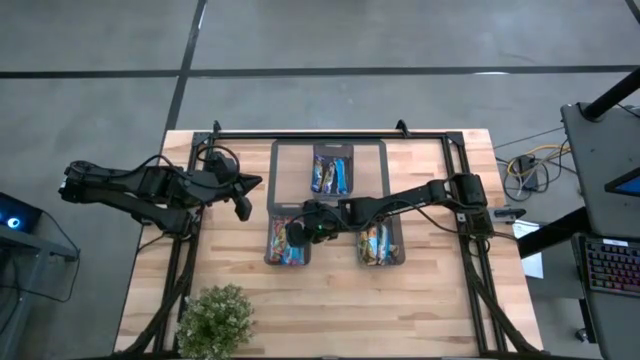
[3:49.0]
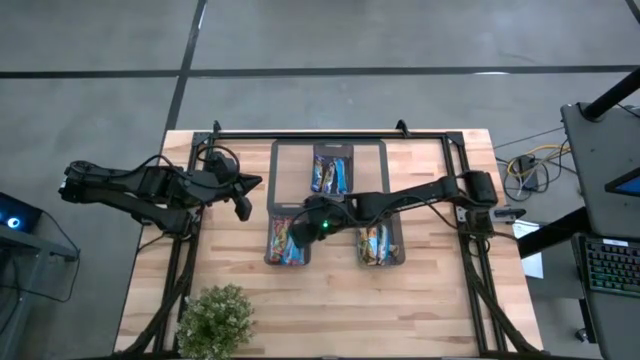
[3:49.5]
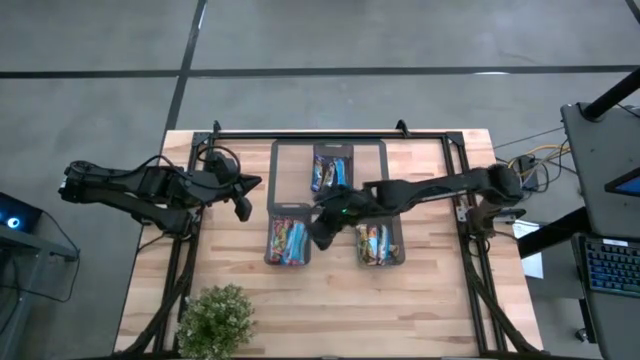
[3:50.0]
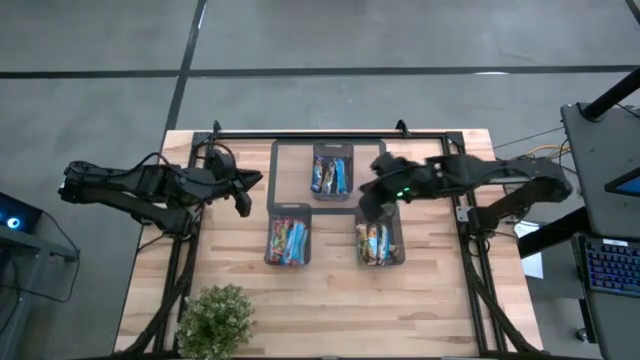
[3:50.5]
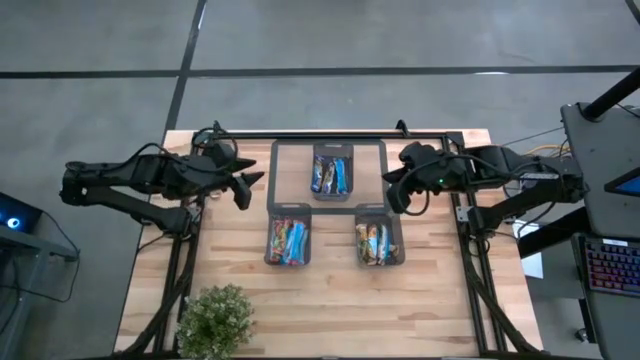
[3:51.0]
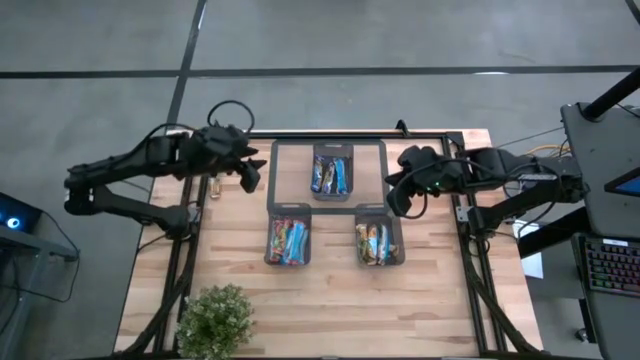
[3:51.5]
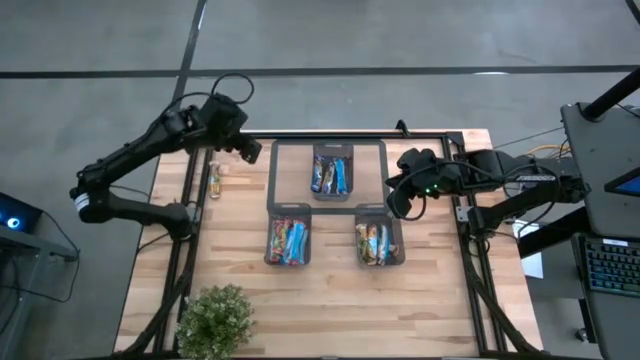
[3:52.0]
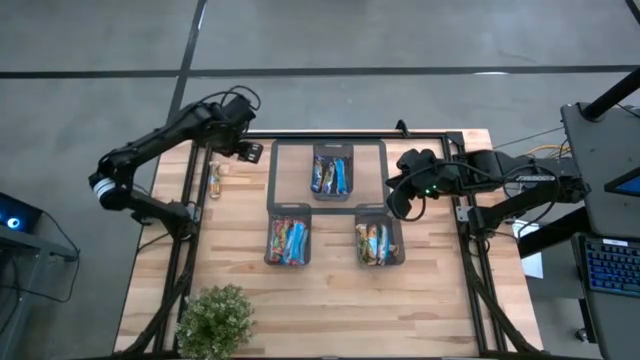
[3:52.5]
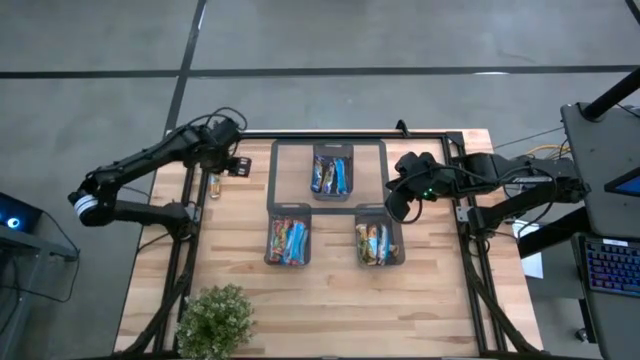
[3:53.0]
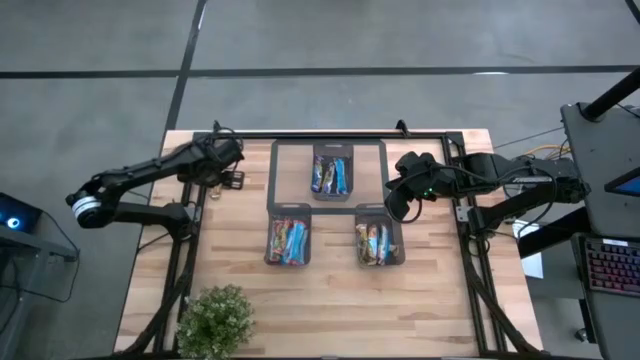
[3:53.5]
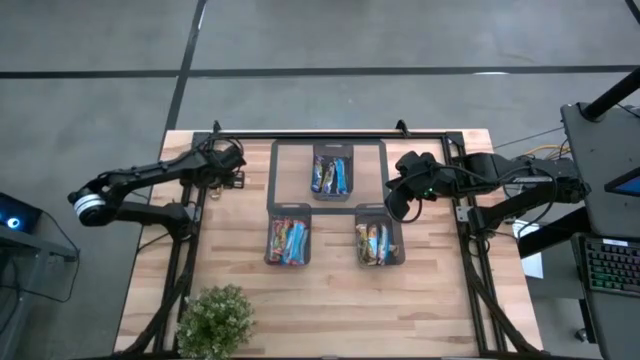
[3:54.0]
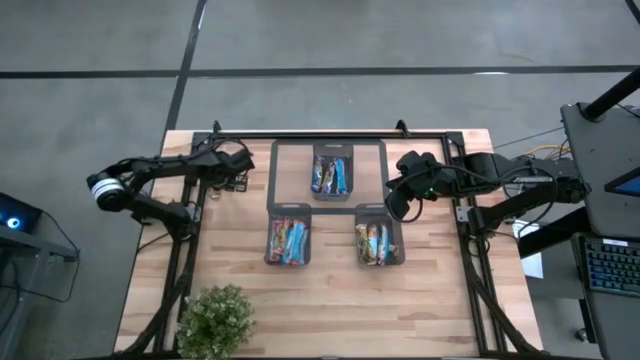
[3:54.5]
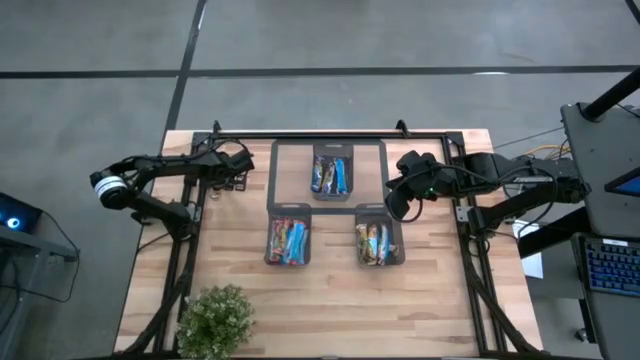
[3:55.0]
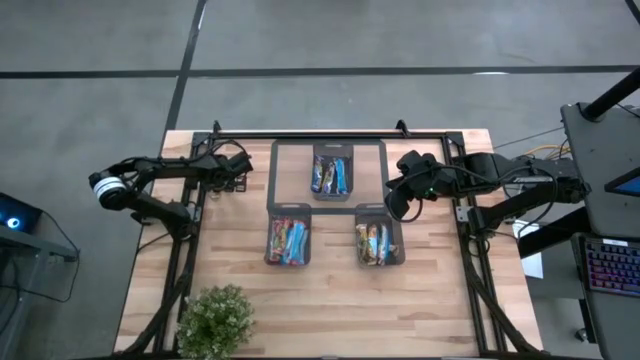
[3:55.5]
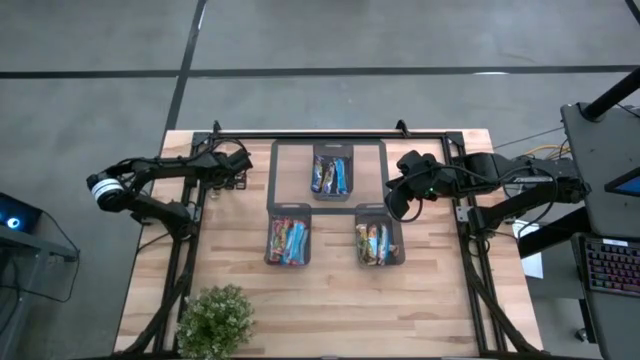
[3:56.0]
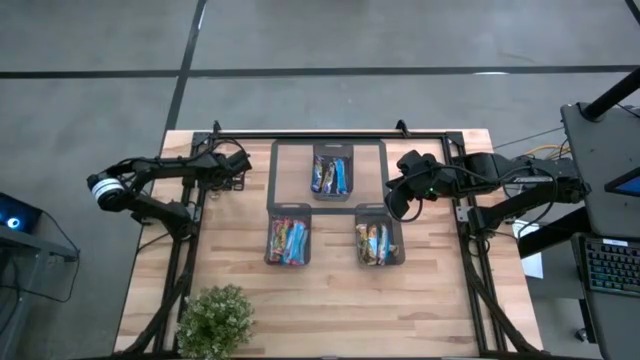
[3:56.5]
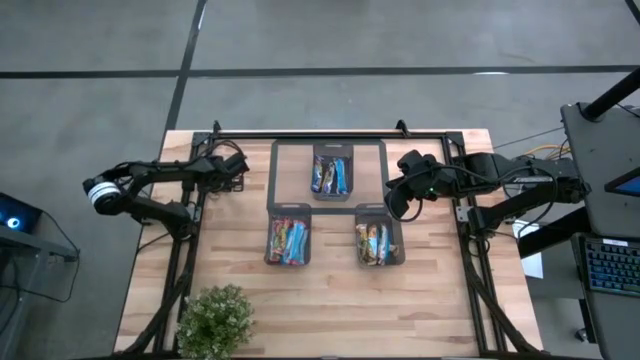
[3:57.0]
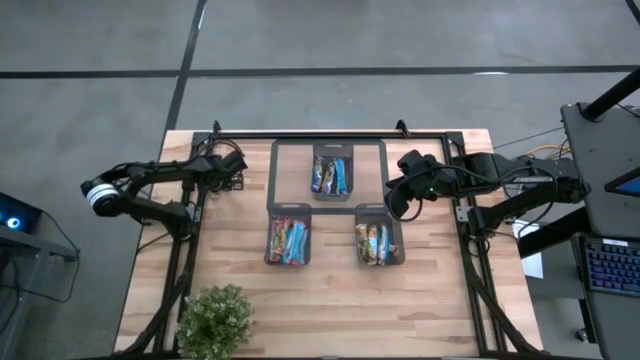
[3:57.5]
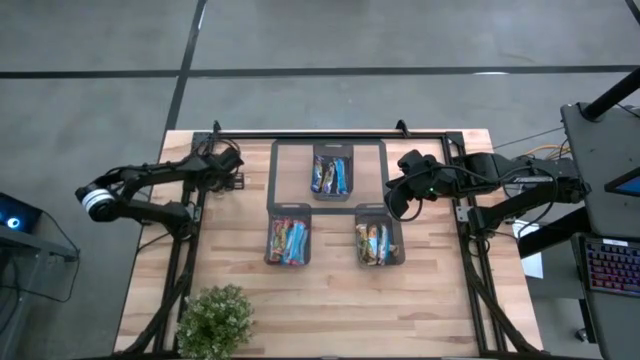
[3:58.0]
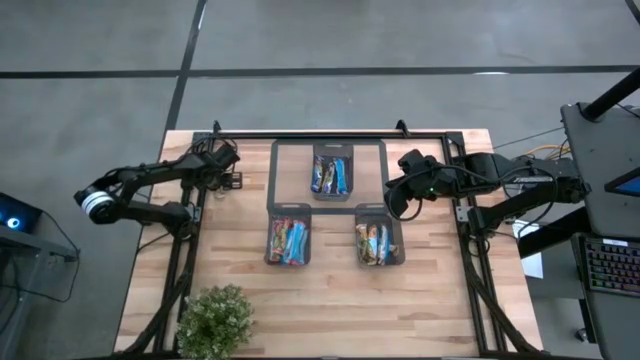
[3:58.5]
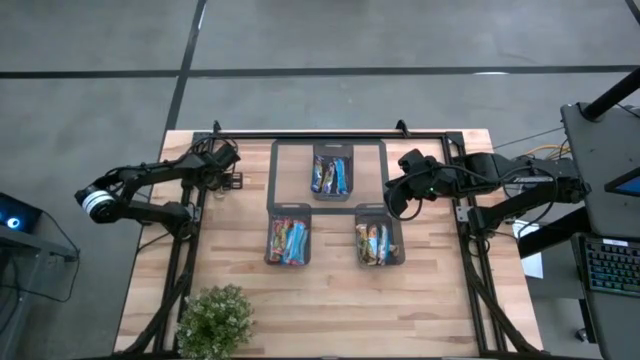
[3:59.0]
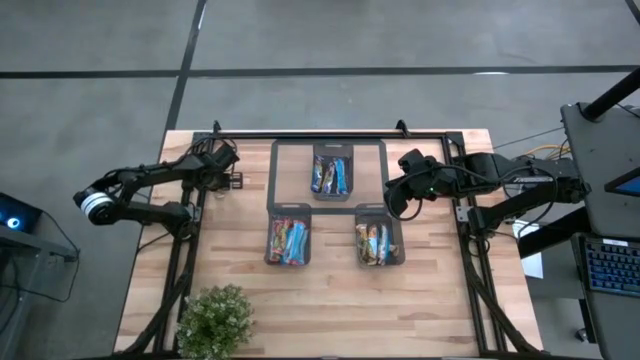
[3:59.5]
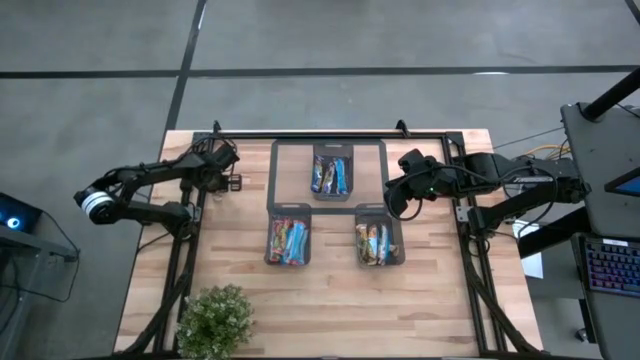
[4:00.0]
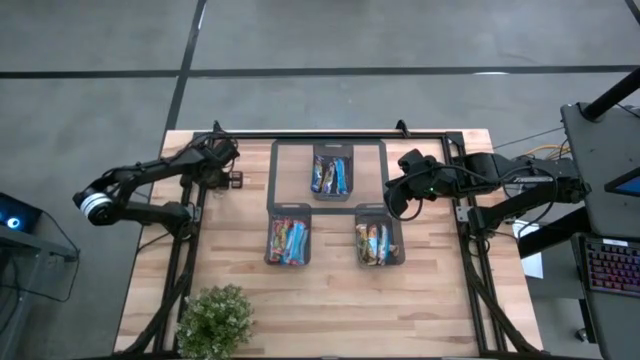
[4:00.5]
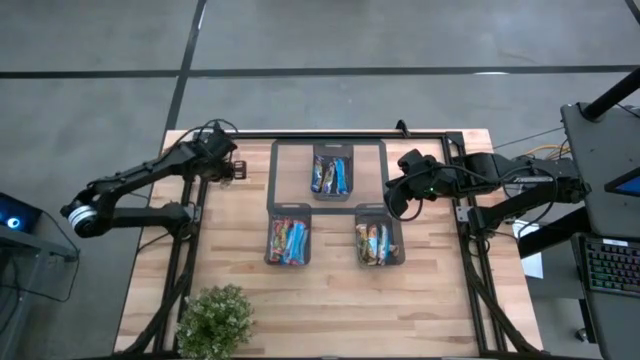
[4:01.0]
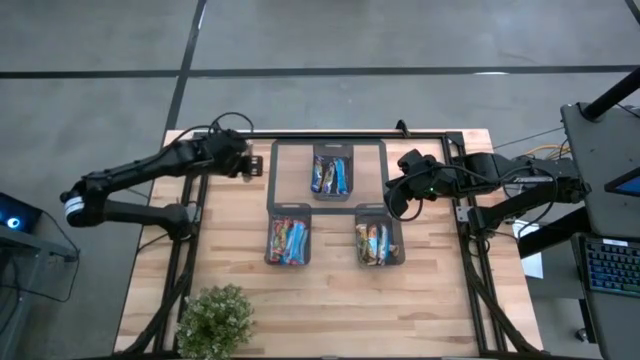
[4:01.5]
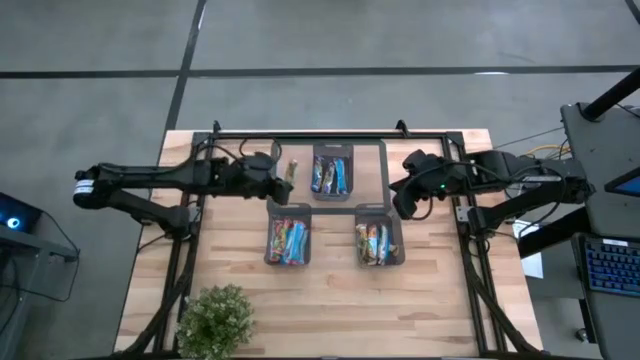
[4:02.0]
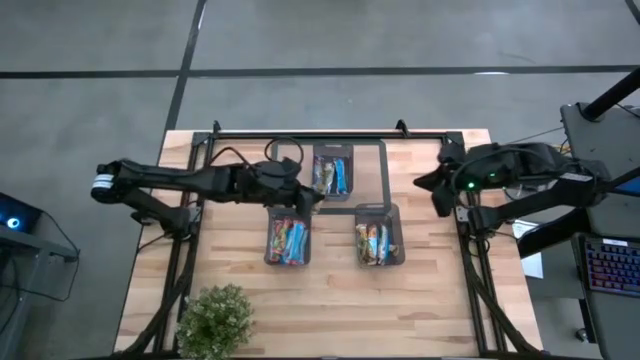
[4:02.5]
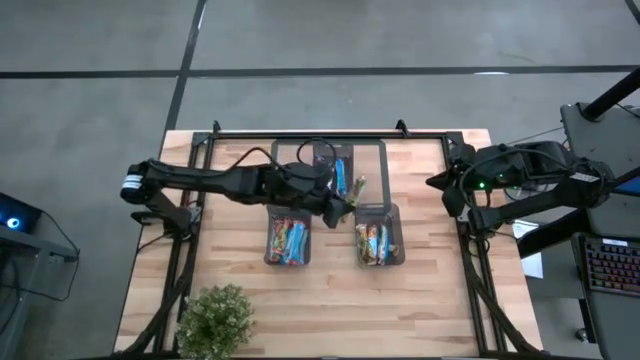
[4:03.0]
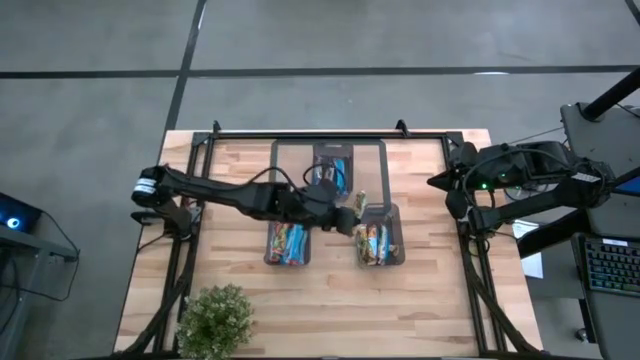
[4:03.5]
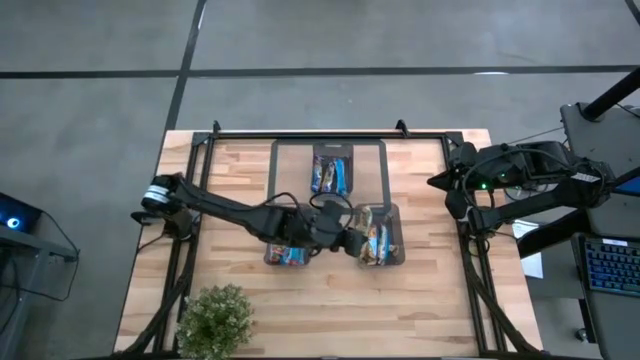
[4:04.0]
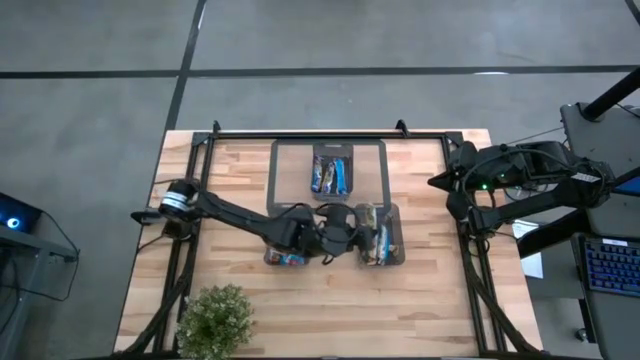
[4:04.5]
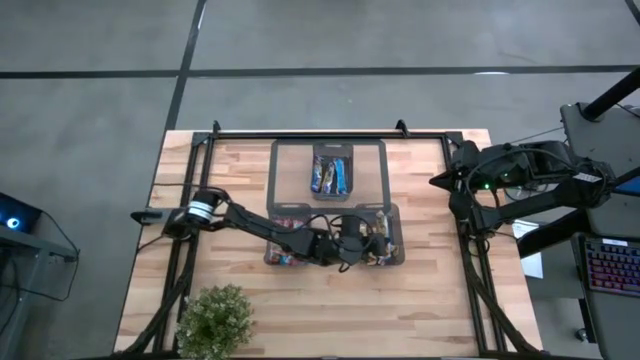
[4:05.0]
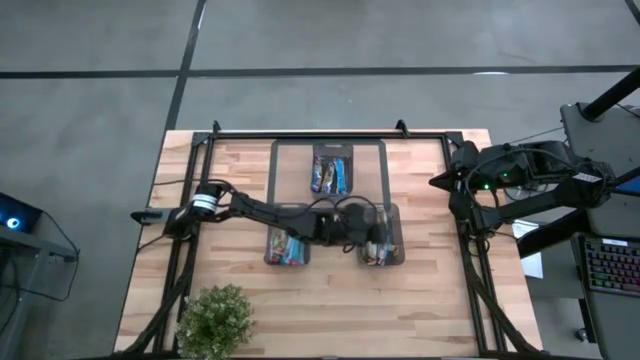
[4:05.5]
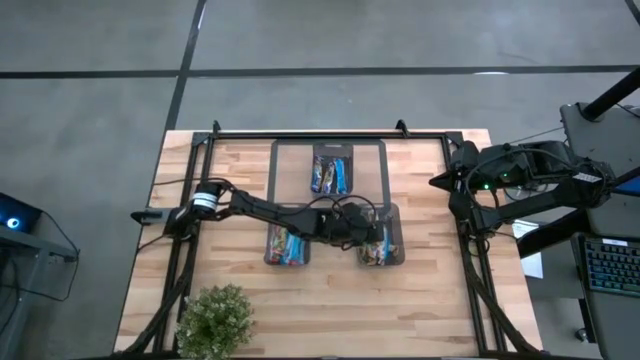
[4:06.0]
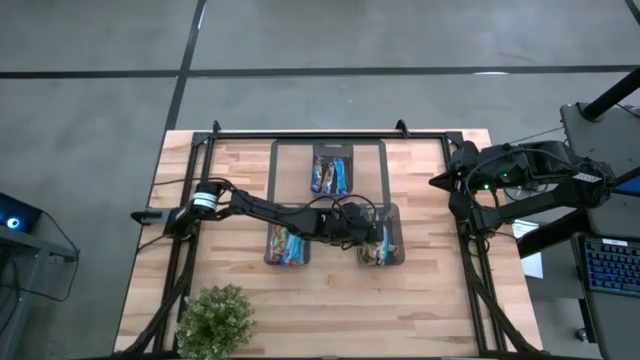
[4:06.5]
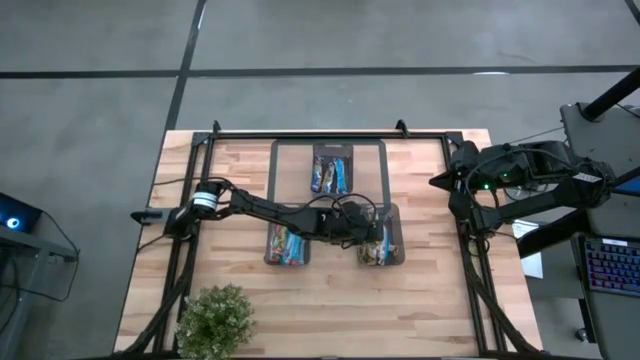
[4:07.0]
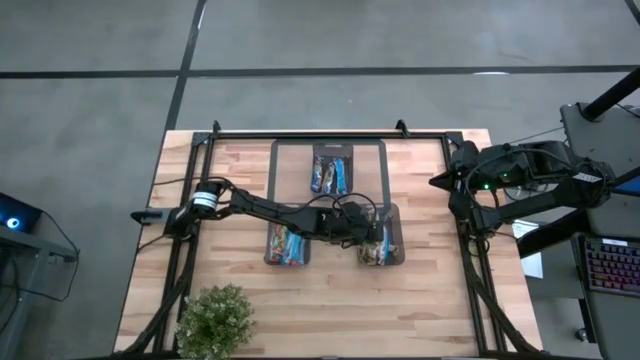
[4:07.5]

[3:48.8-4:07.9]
Task: Pick and place Granola Bars by type
Put the orange granola bar into the bottom right black bin

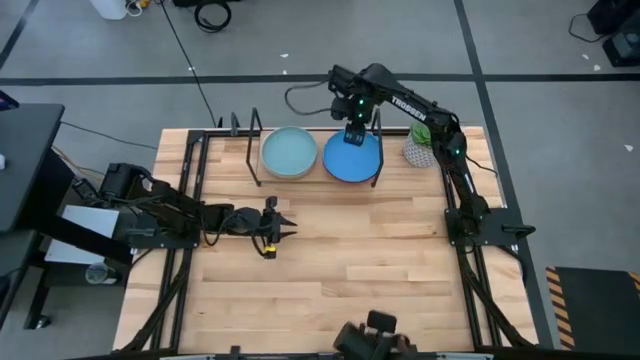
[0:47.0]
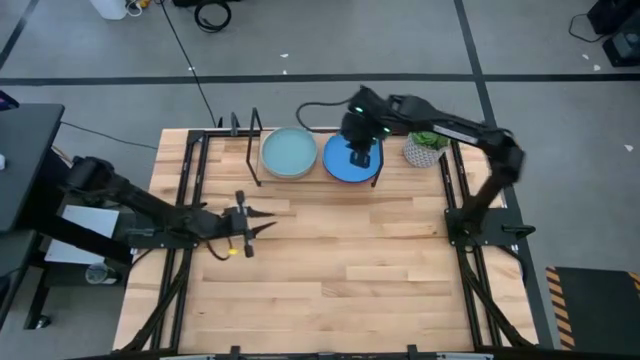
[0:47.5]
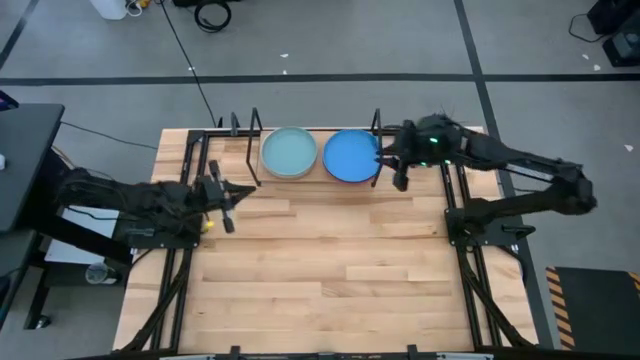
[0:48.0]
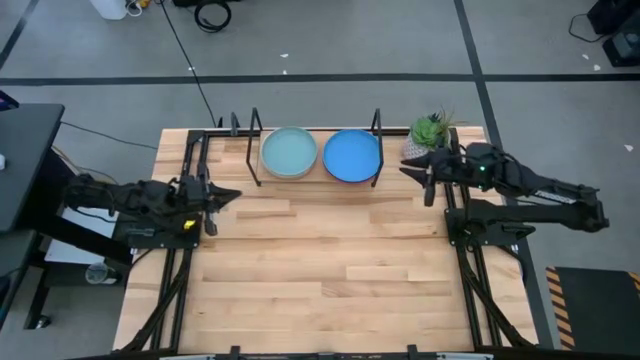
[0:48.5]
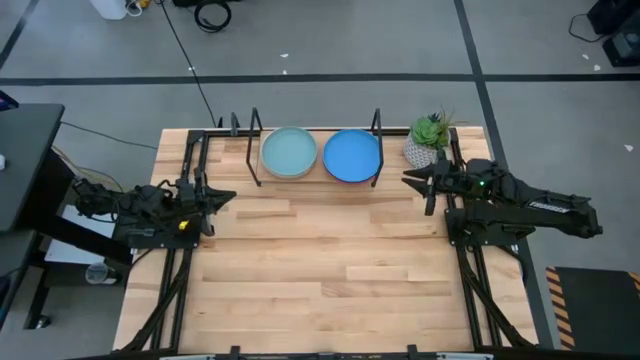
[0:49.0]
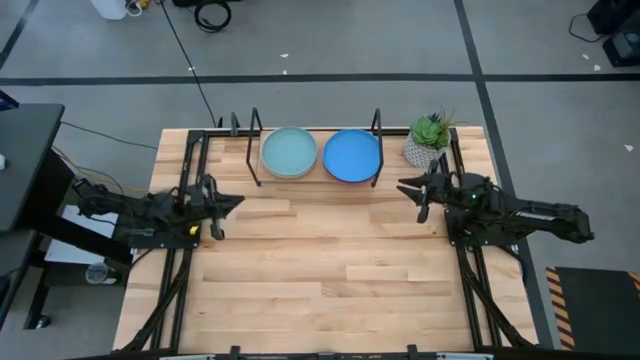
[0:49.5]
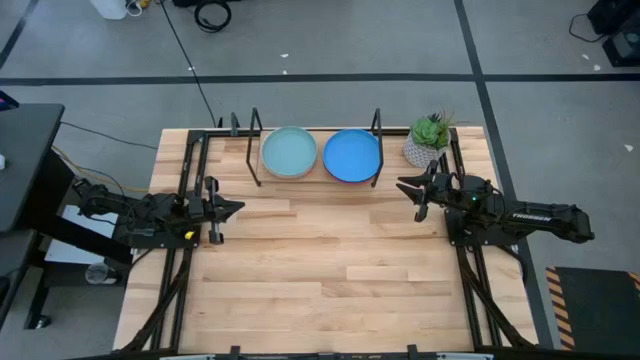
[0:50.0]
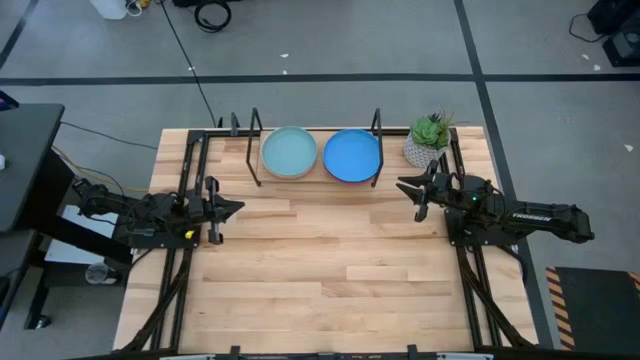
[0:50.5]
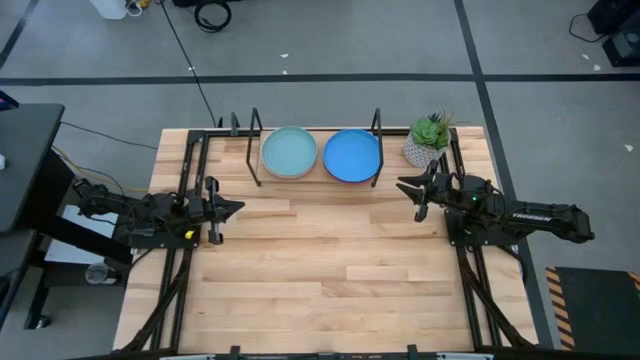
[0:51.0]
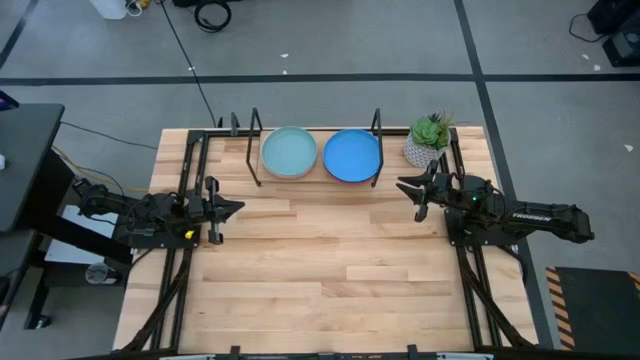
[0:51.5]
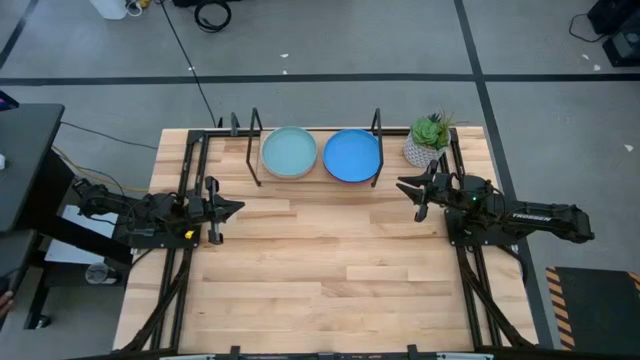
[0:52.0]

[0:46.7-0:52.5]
Task: Place and stack plates onto a shelf
Return to Home Position
